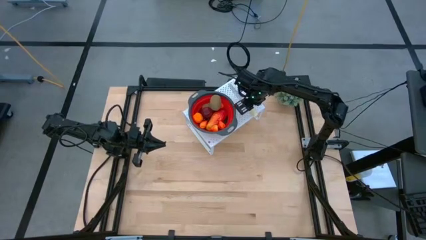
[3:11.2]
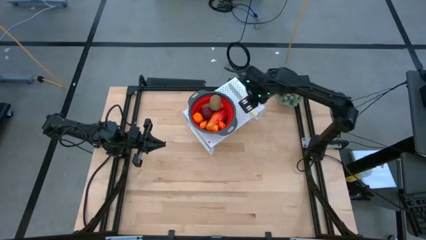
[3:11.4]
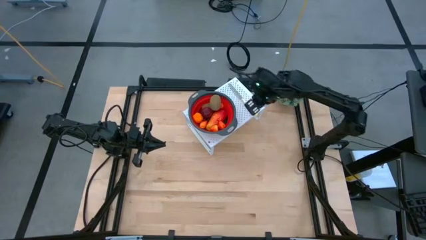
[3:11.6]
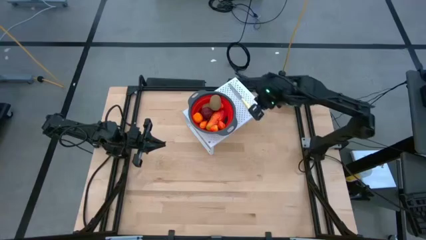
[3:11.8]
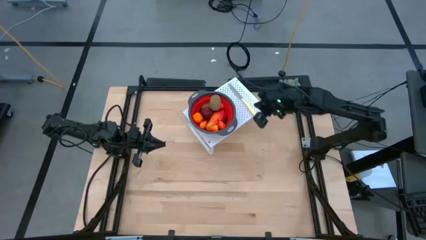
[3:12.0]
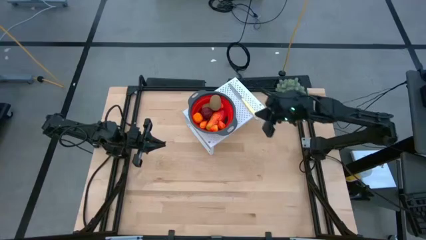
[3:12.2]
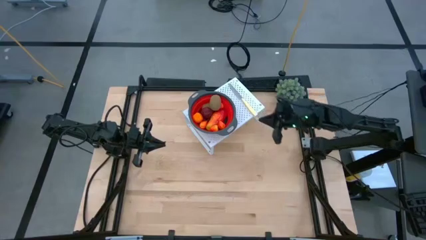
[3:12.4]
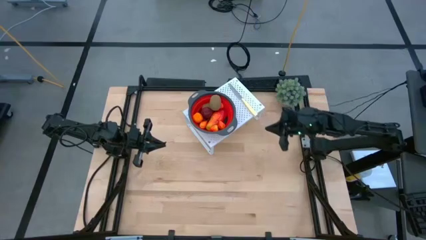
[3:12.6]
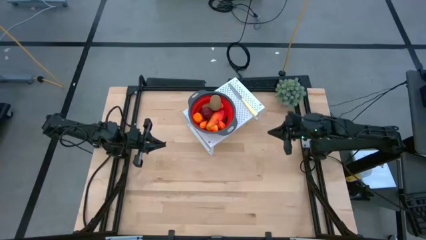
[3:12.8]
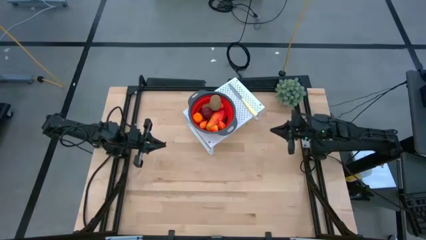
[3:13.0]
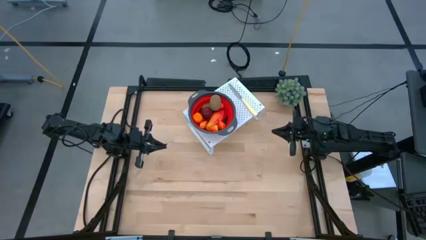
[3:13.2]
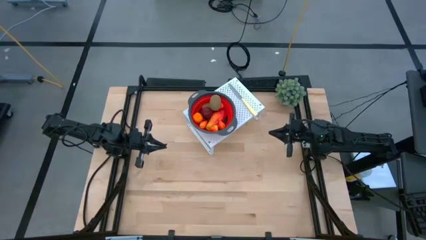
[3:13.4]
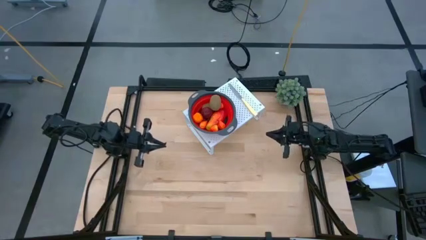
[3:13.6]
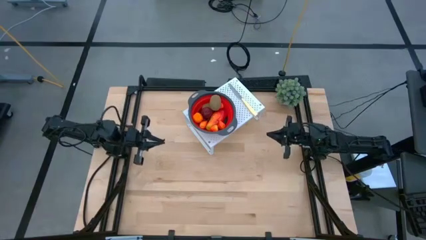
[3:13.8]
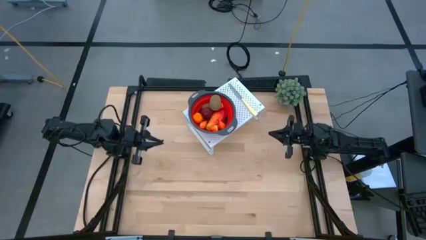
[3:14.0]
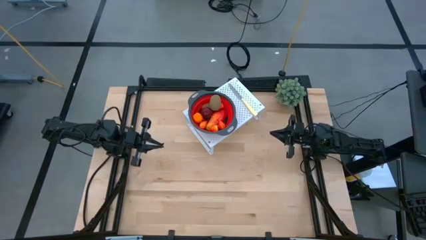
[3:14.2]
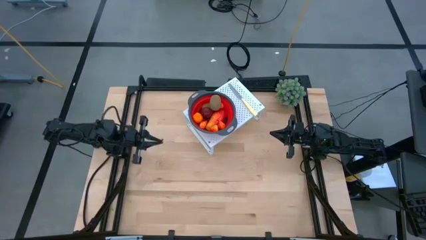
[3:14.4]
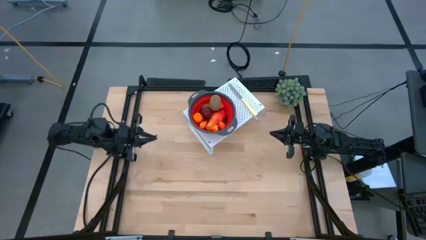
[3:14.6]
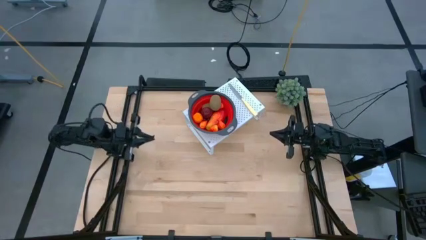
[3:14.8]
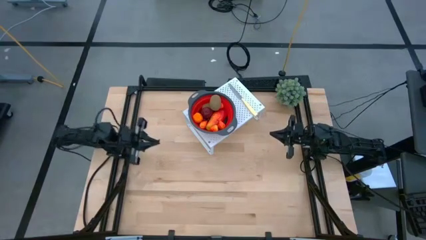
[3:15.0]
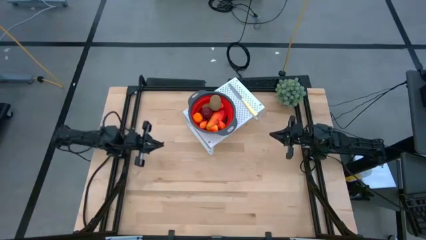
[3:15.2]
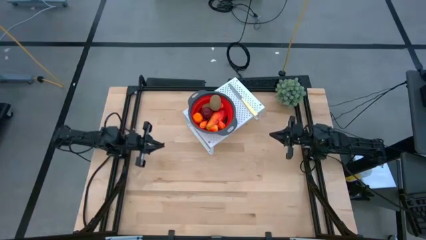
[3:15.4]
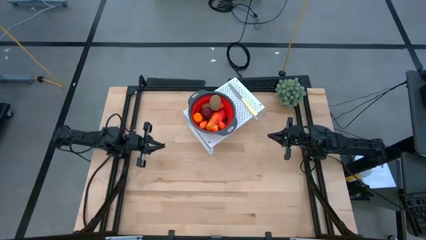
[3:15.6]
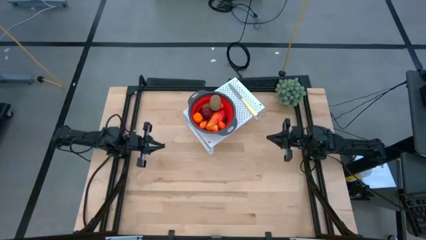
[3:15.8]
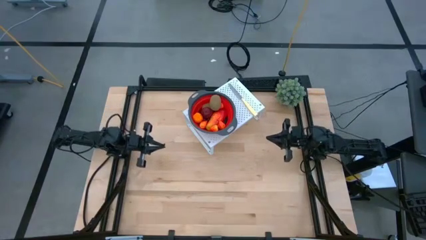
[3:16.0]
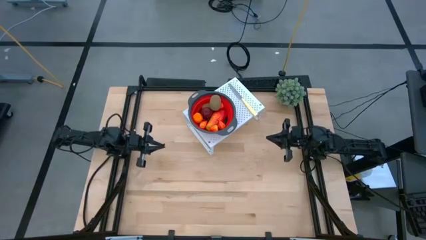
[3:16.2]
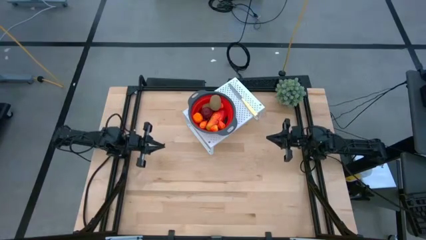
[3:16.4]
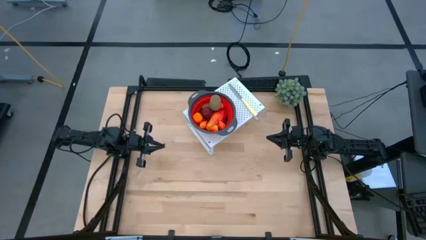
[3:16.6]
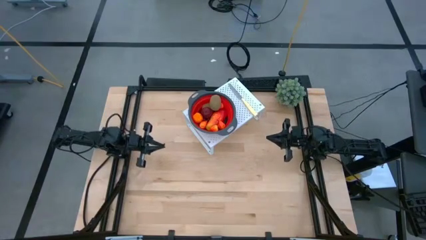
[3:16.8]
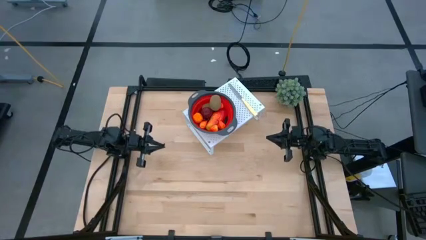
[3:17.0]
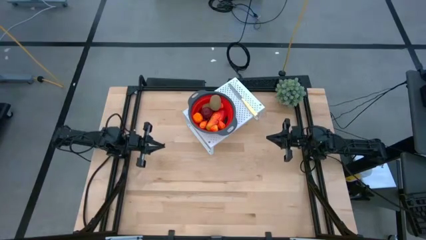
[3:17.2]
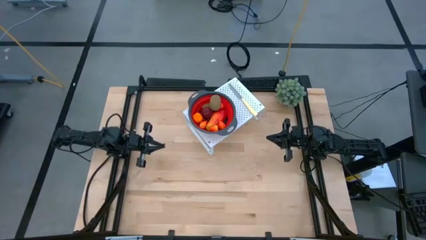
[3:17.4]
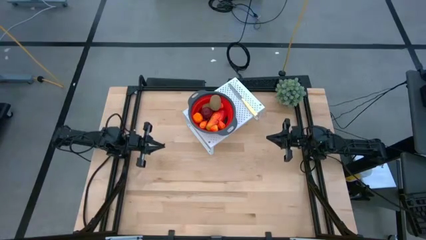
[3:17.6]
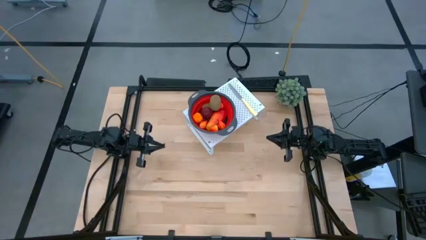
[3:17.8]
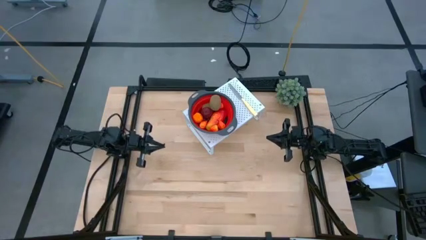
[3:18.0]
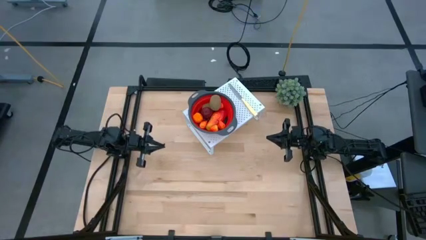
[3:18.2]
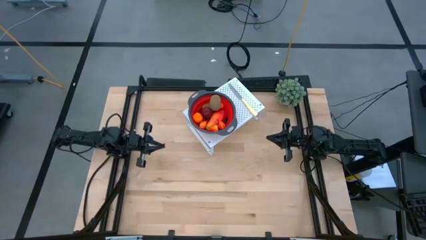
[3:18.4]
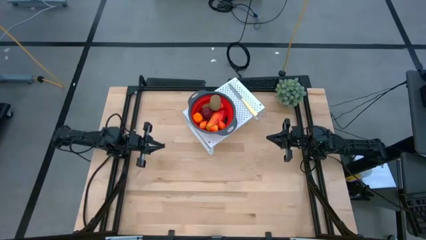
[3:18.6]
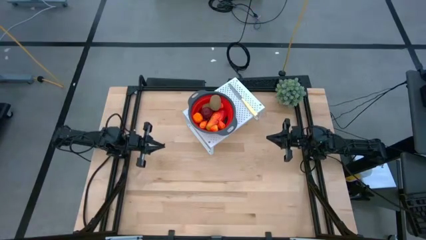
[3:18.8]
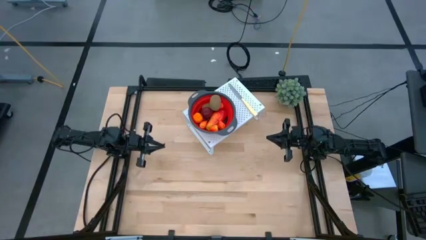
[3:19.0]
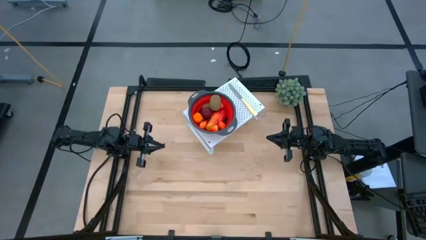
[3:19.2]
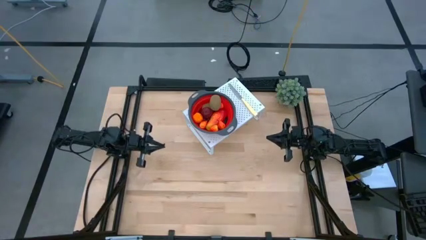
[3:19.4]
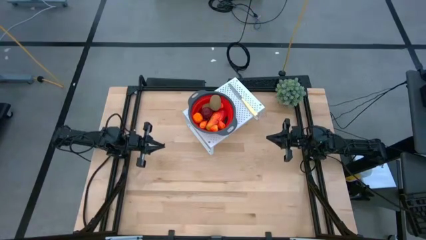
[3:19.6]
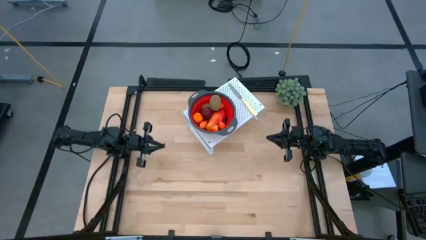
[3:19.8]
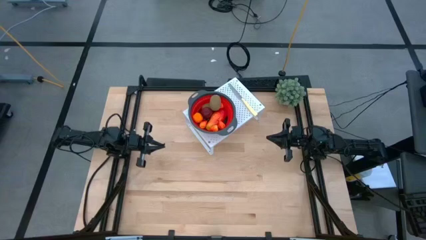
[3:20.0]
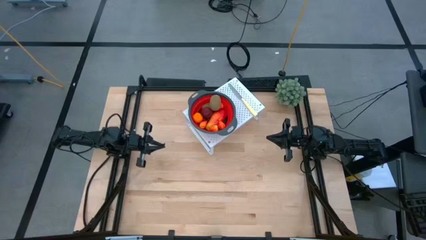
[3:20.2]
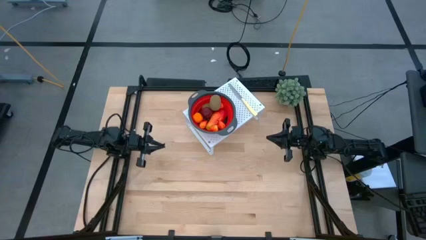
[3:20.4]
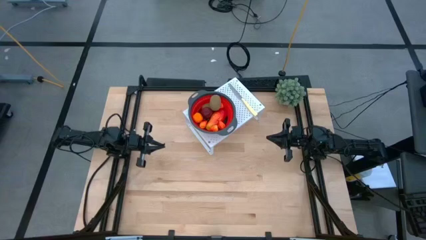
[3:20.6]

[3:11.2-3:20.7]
Task: Pick & Place Fruit
Return to Home Position

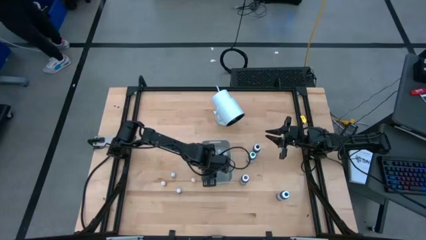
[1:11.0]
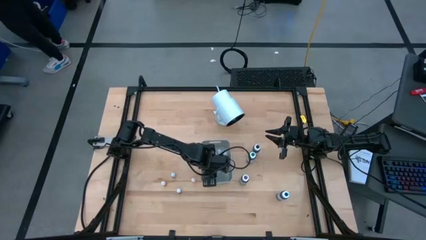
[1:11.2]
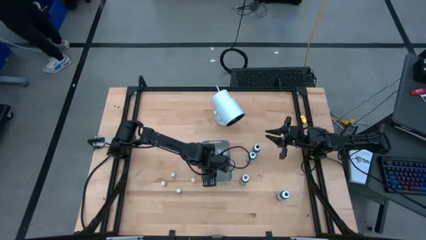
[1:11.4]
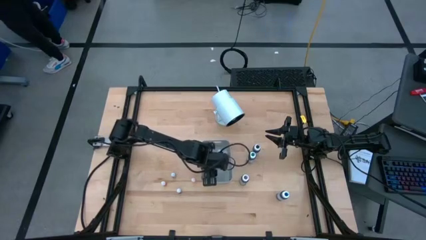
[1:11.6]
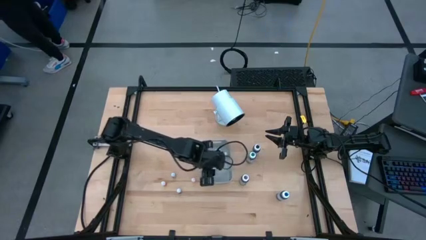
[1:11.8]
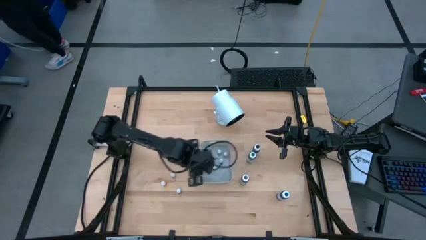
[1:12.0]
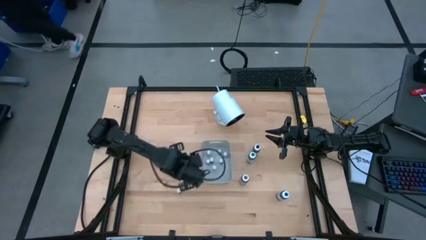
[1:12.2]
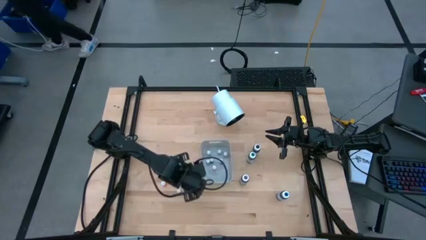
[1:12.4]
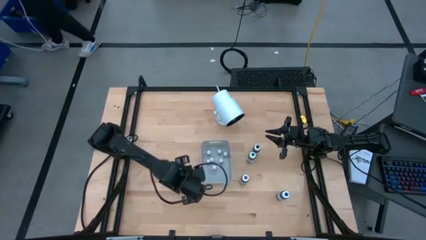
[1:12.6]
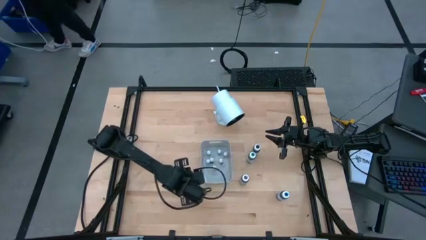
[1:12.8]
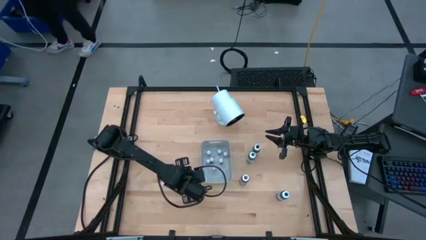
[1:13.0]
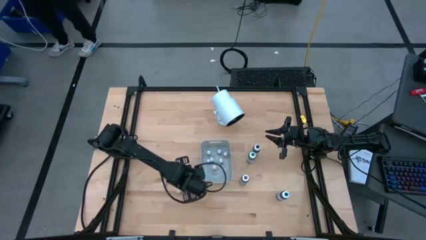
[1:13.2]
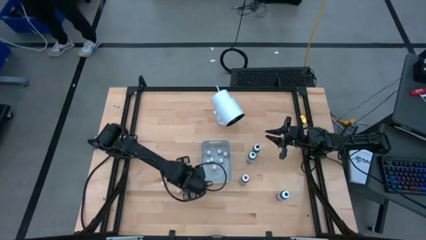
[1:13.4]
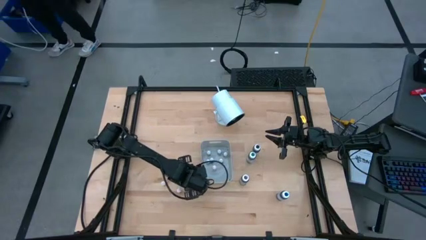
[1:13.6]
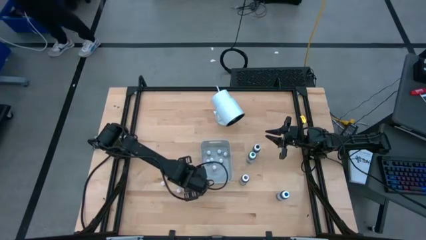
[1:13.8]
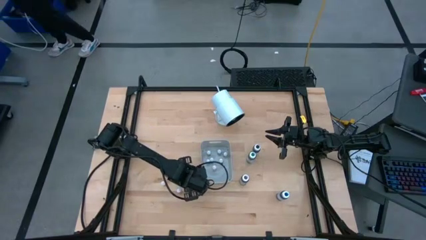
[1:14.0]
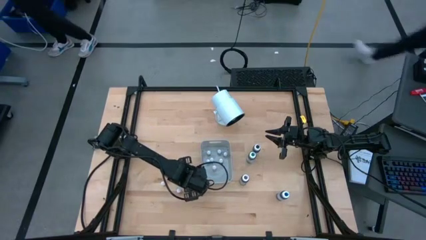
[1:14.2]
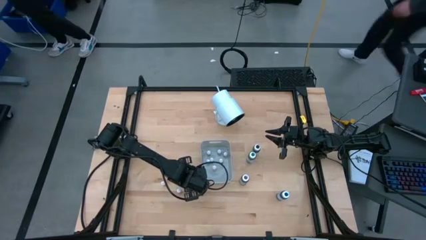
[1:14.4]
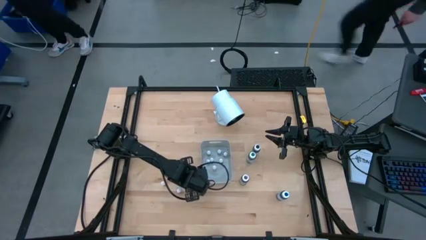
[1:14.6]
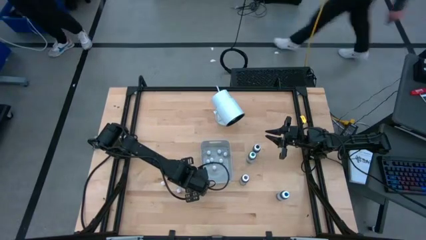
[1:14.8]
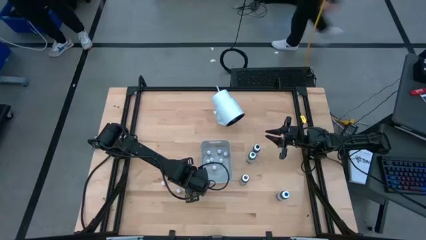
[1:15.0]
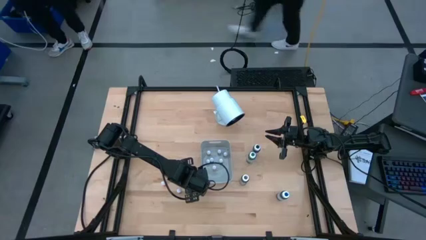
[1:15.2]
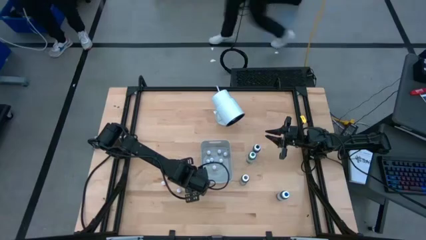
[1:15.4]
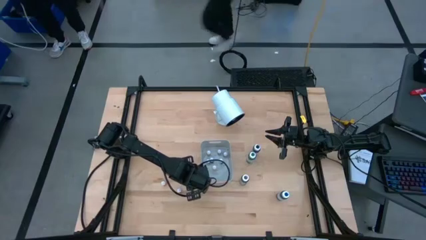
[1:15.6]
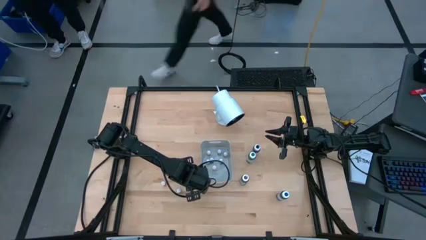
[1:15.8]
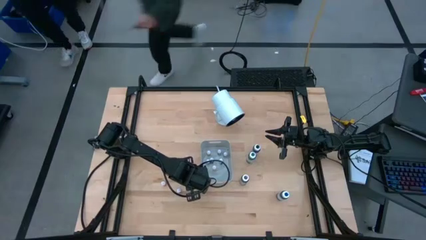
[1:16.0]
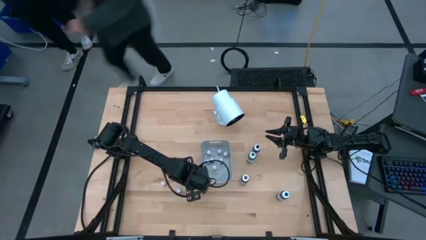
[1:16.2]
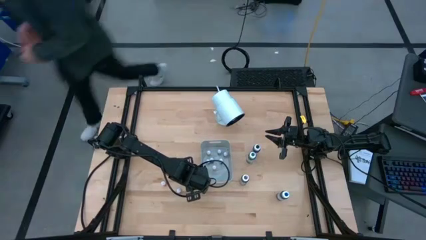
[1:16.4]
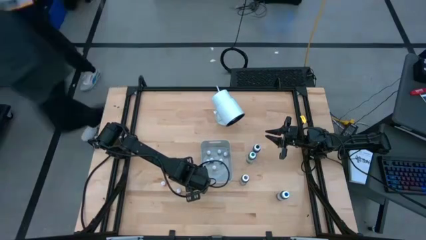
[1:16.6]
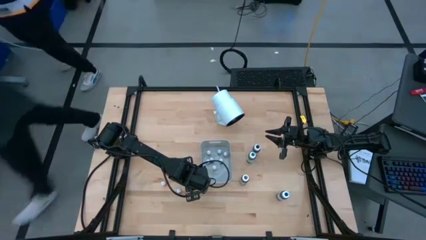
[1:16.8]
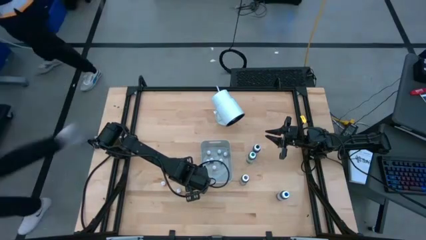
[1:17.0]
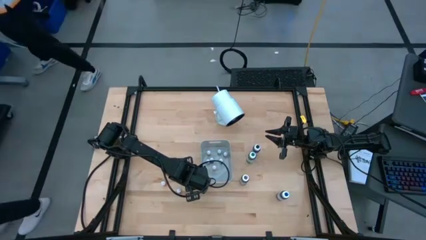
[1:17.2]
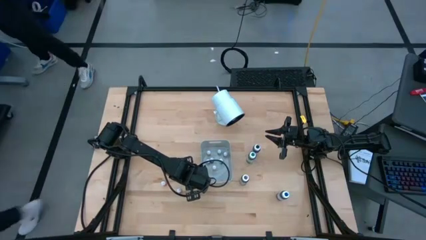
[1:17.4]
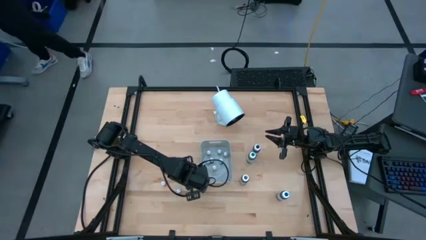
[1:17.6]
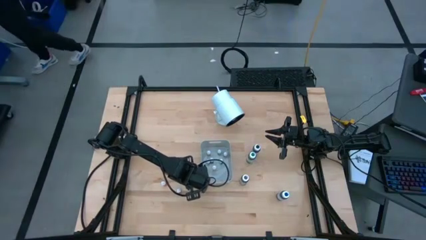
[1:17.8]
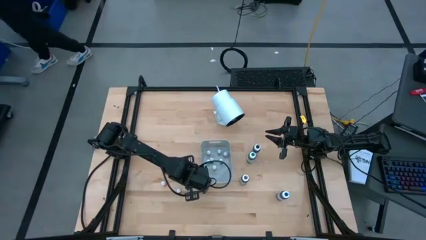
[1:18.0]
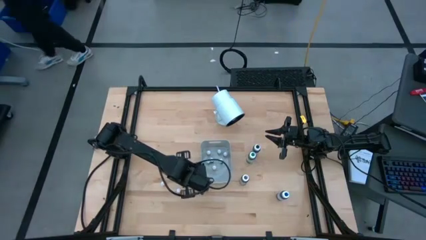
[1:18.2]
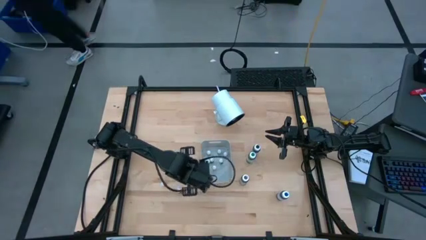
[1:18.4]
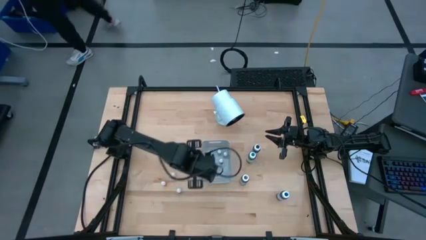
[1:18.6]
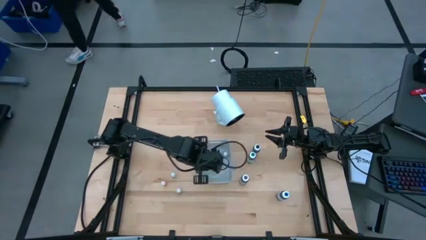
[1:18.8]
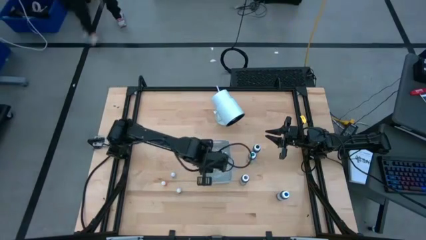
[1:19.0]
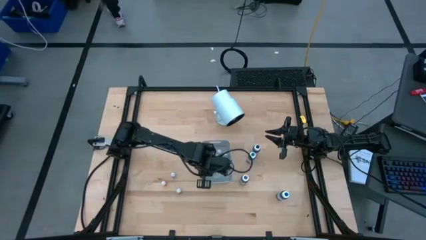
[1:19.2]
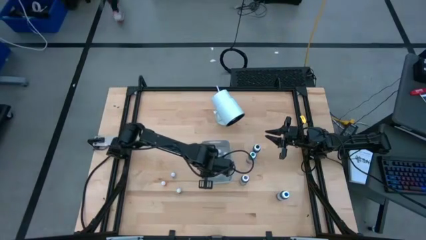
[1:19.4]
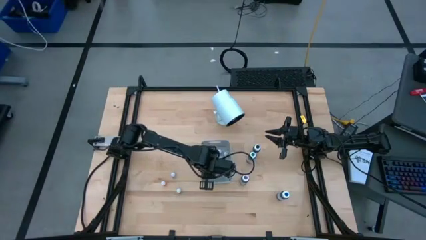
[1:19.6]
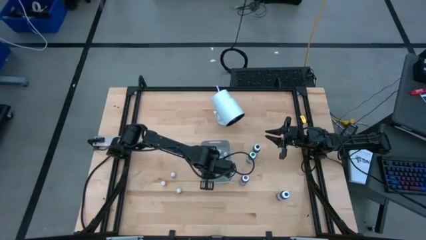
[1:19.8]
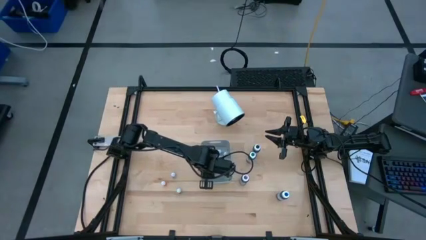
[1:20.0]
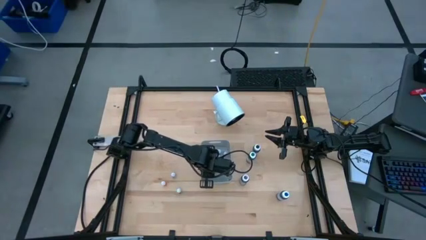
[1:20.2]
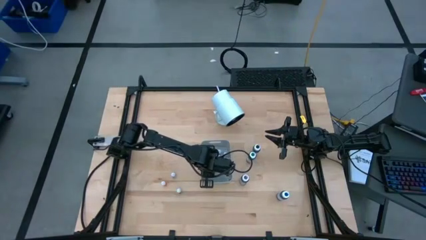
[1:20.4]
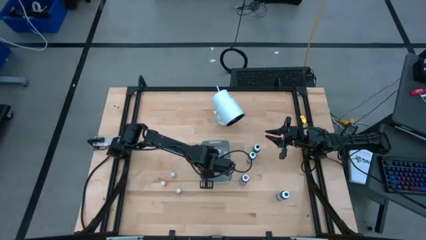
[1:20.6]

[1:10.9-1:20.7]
Task: Pick & Place food coloring
Put the right small orange food coloring bottle into the gray bin
